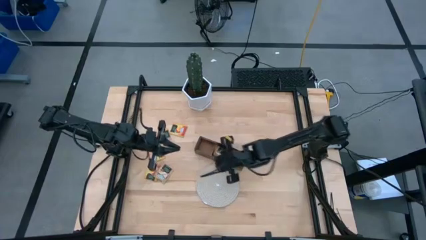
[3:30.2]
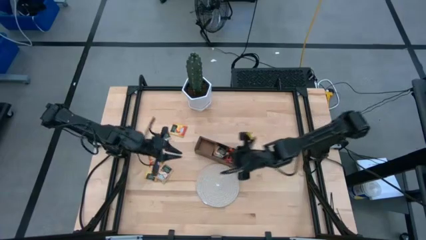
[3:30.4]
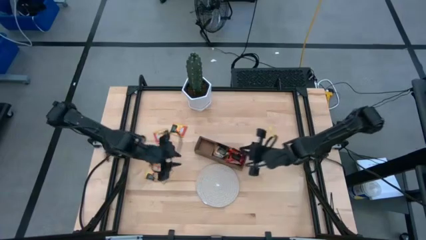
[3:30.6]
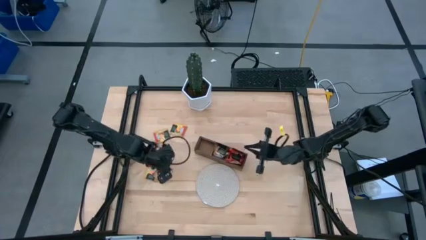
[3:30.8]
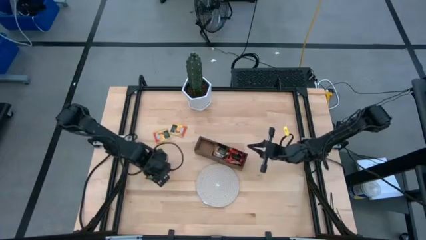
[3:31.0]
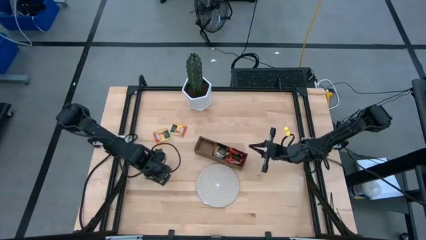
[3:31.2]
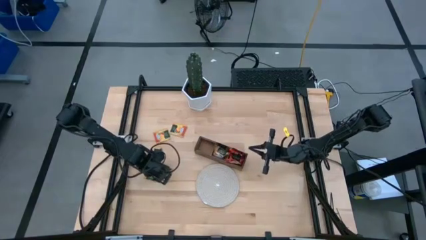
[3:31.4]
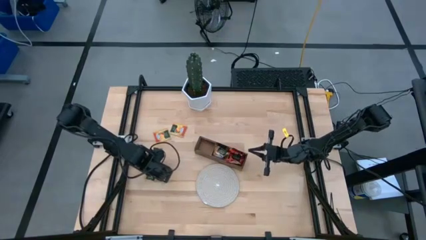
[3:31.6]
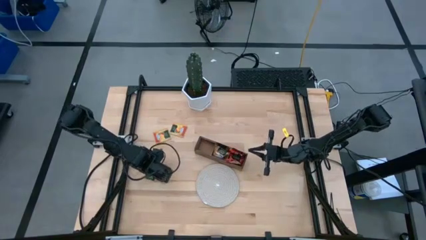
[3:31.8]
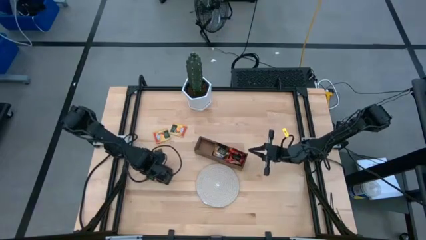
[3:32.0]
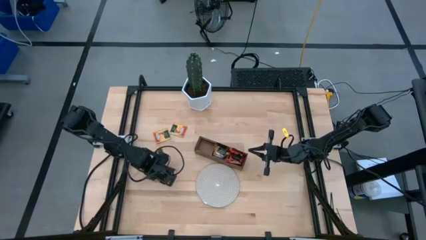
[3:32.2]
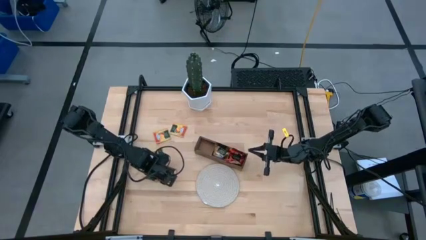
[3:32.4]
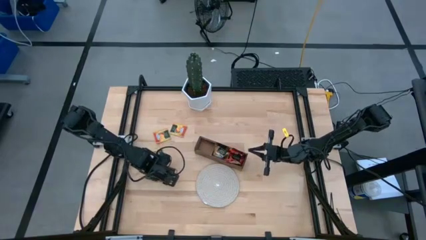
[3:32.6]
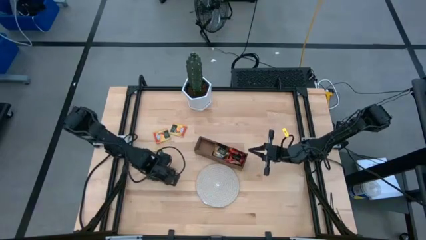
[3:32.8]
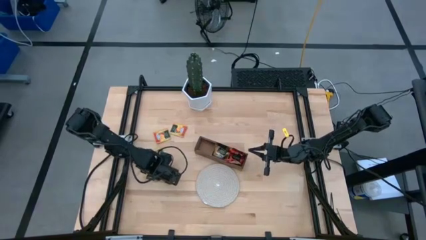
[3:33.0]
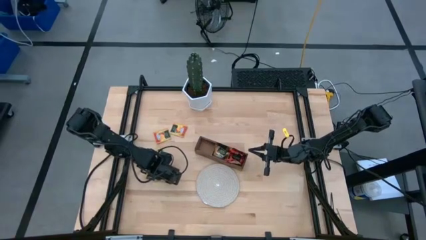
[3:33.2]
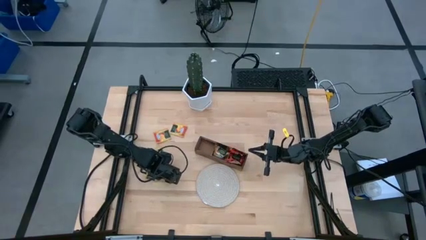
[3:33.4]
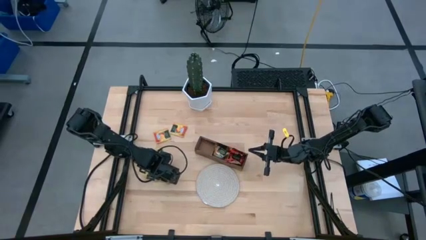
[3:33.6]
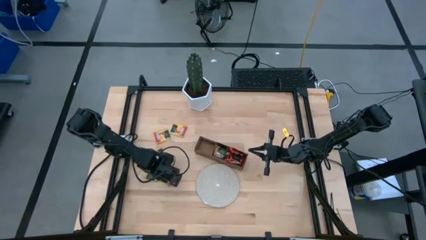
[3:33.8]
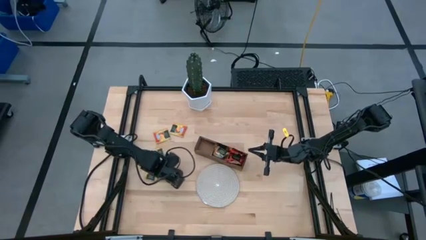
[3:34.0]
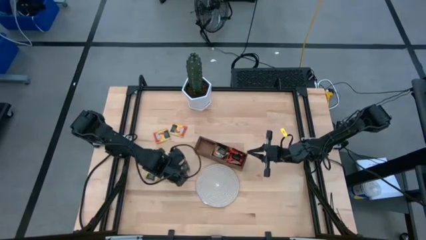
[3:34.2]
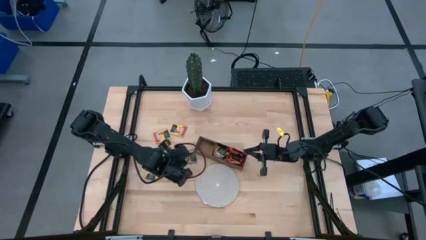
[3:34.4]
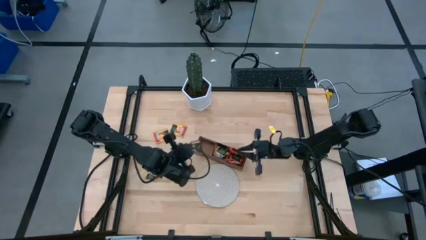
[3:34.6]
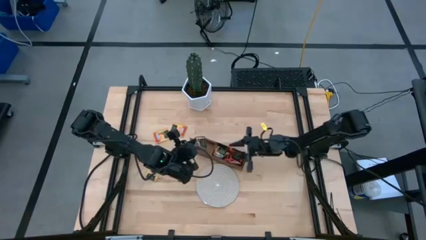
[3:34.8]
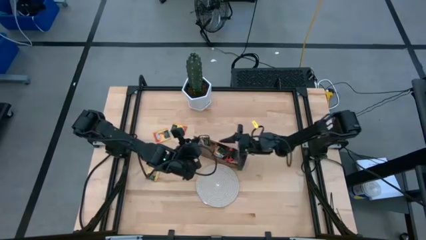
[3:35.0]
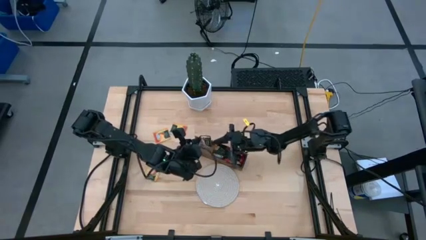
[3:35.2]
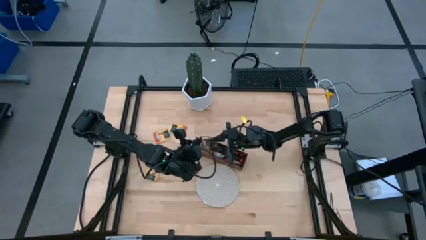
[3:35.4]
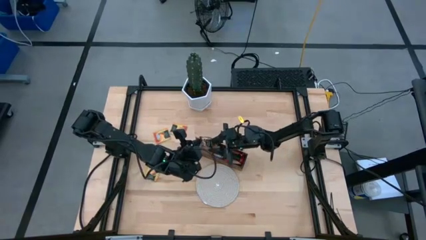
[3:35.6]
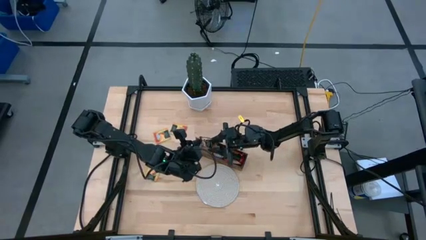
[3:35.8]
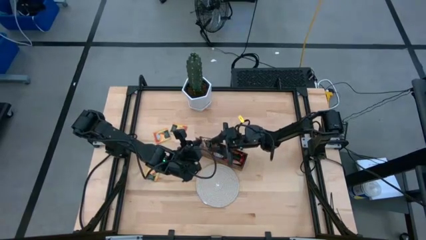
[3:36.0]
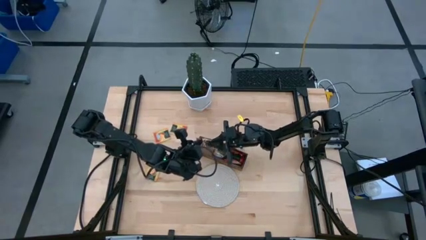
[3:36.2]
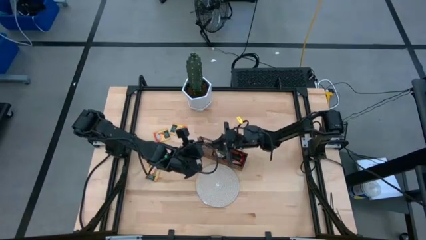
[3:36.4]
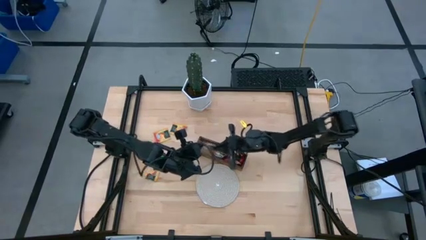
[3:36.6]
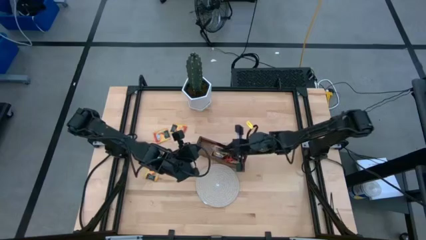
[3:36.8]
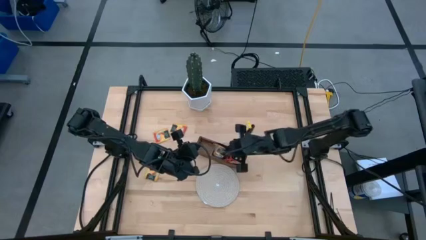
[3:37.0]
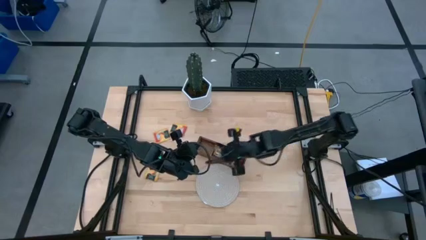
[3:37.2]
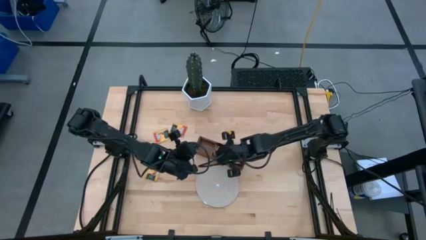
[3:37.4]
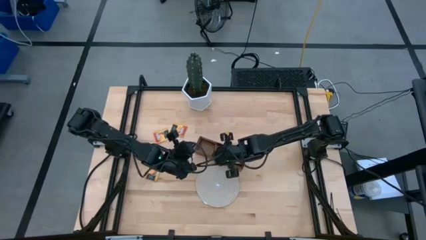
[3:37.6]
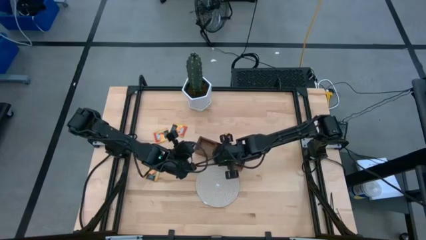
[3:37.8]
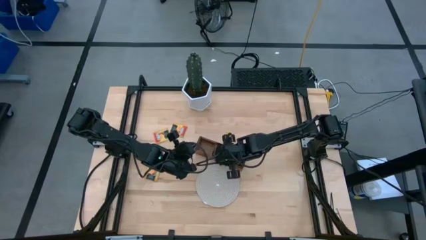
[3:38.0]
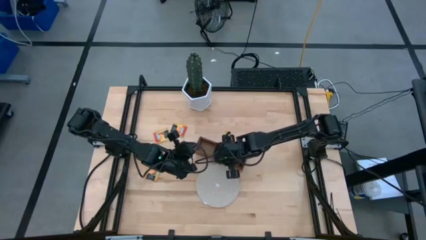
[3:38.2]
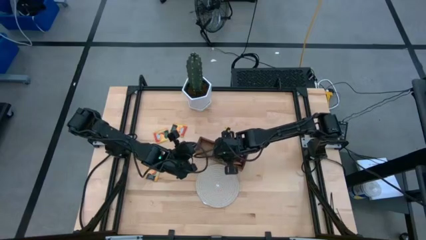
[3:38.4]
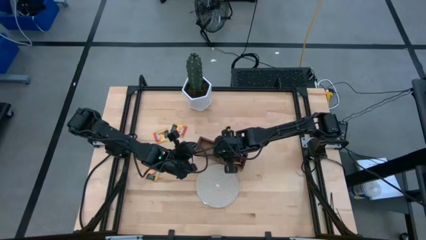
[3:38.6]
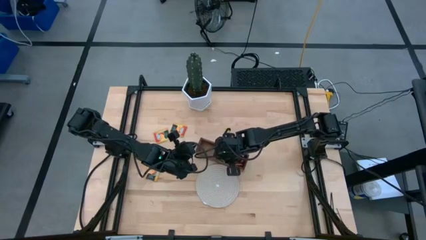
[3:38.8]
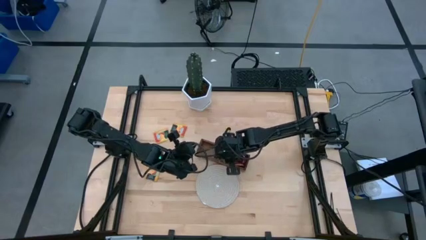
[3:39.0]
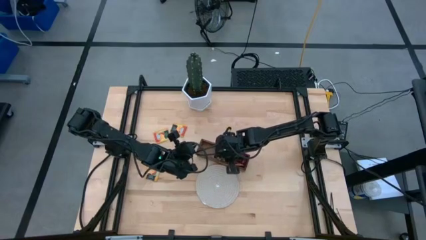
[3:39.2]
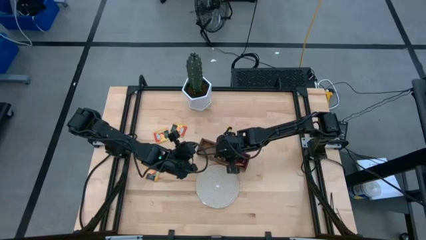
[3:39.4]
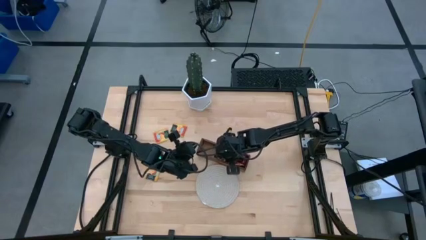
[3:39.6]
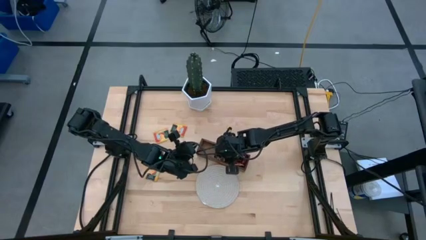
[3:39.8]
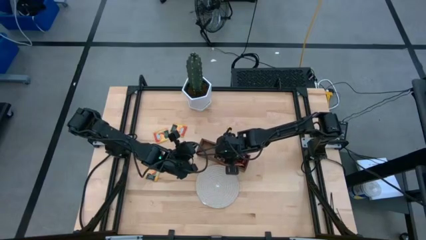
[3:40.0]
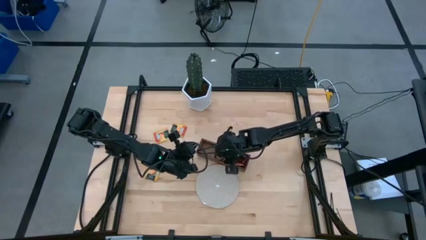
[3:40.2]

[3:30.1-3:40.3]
Task: Pick & Place Tea
Put the brown tea bag into the middle section of the wooden organizer

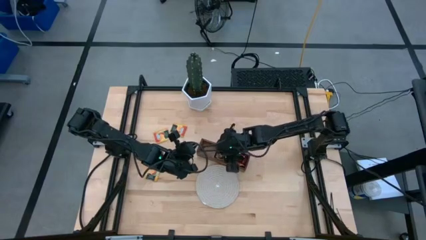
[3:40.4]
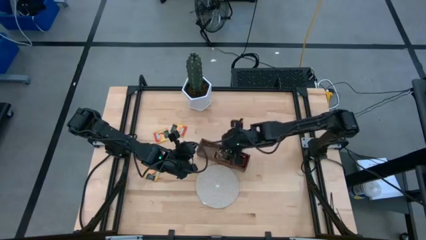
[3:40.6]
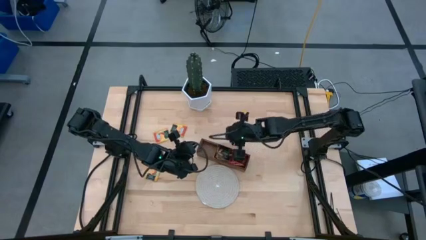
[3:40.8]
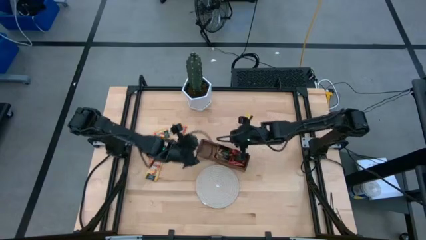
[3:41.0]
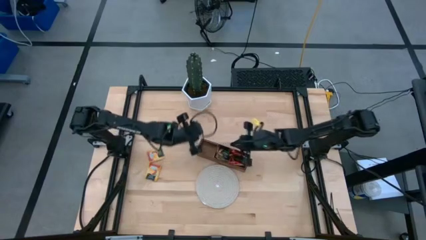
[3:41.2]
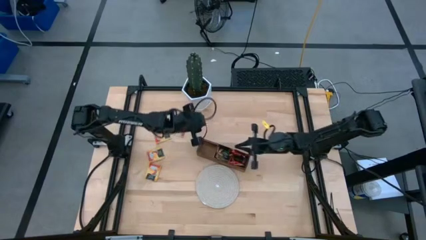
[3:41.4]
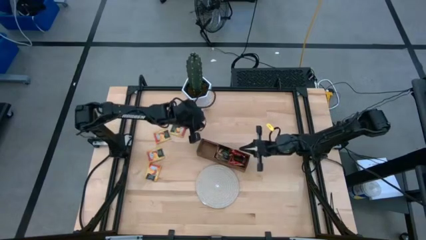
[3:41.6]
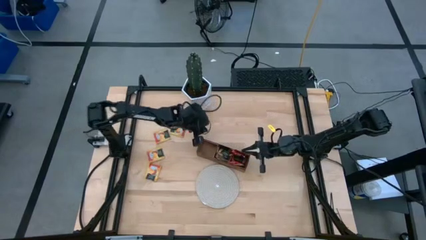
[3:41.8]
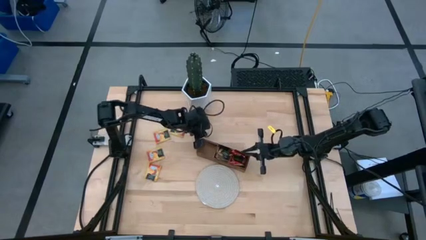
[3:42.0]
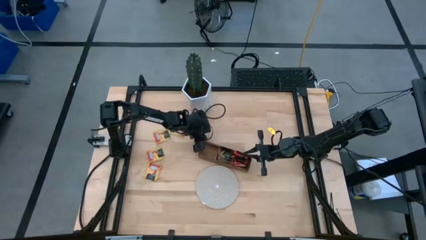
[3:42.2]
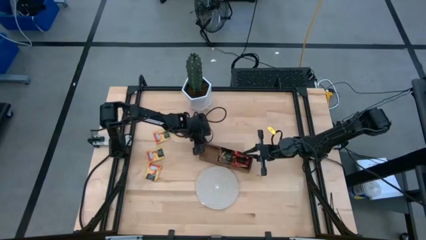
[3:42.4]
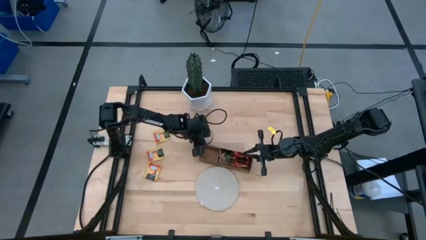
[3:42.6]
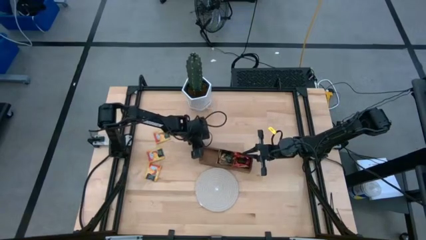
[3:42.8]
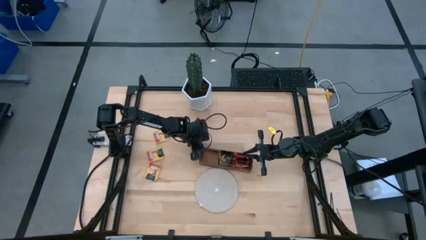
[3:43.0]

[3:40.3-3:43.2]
Adjust the wooden organizer

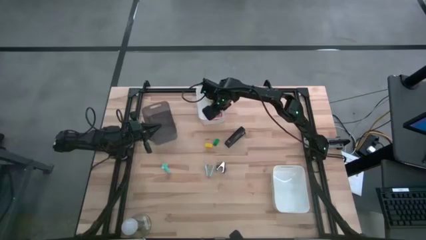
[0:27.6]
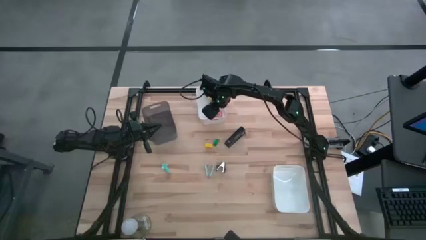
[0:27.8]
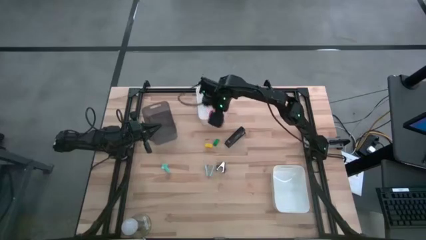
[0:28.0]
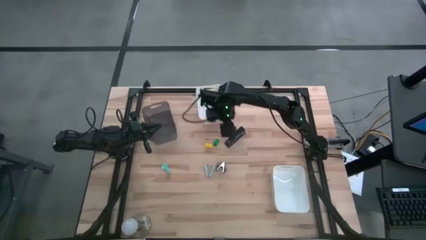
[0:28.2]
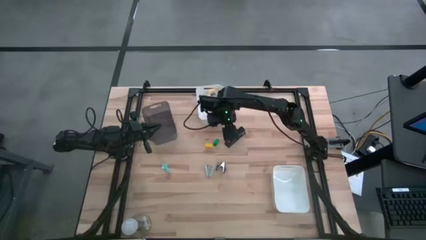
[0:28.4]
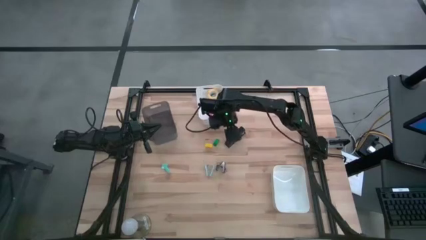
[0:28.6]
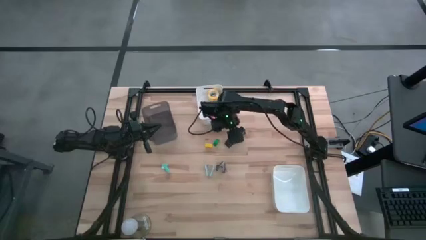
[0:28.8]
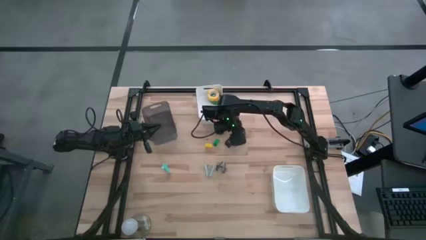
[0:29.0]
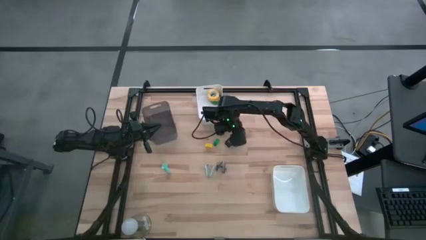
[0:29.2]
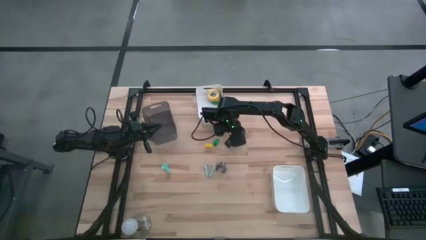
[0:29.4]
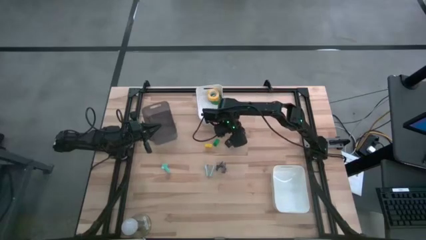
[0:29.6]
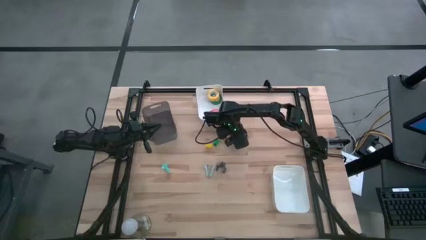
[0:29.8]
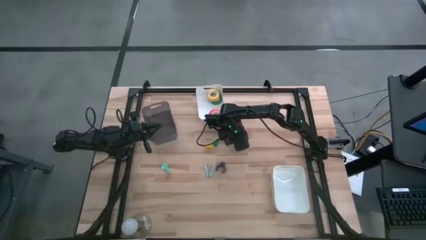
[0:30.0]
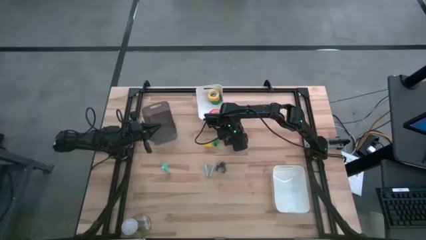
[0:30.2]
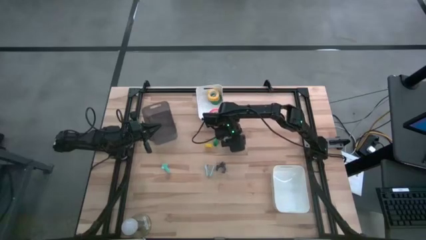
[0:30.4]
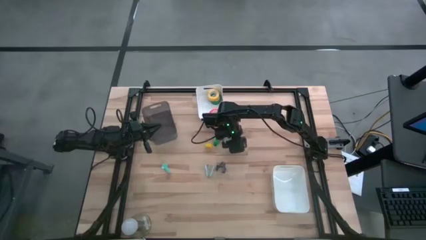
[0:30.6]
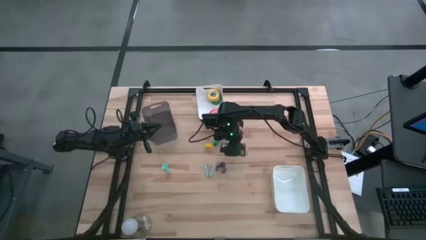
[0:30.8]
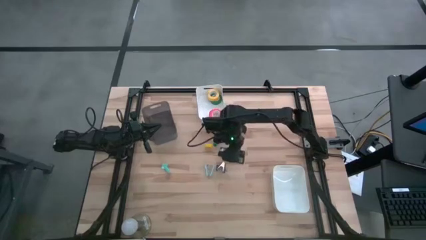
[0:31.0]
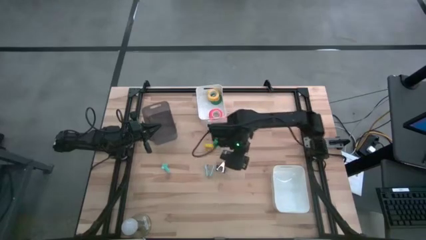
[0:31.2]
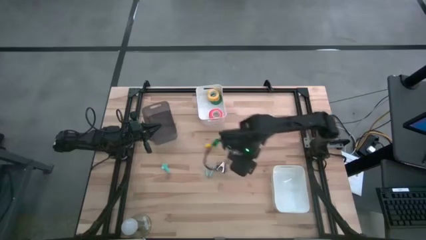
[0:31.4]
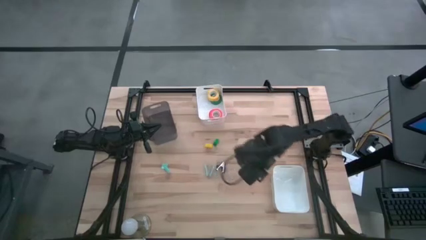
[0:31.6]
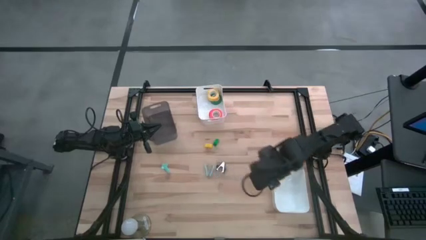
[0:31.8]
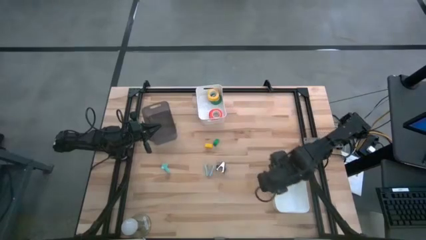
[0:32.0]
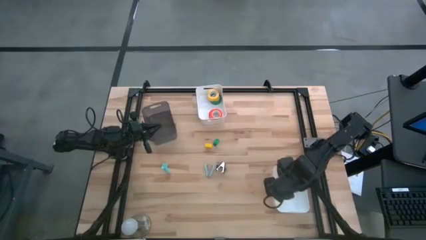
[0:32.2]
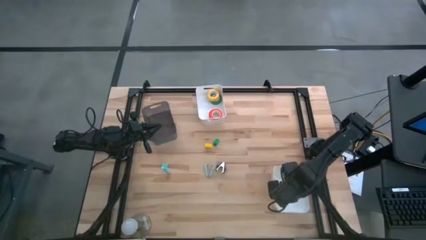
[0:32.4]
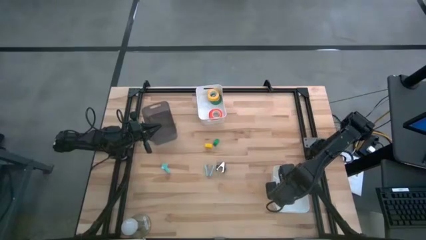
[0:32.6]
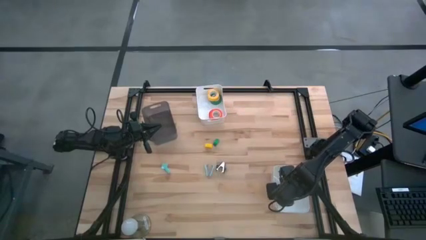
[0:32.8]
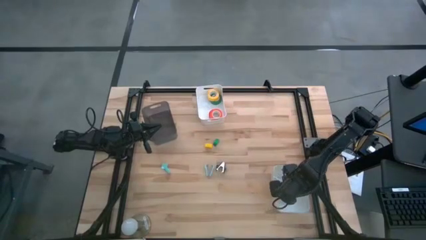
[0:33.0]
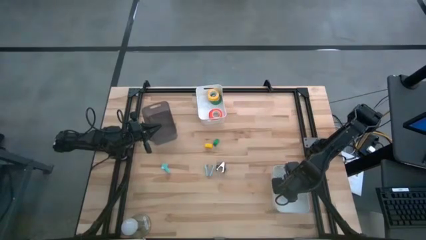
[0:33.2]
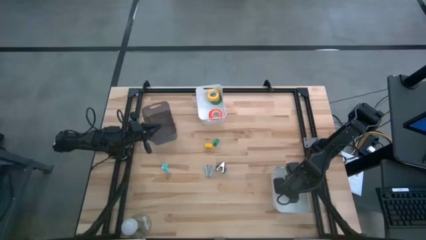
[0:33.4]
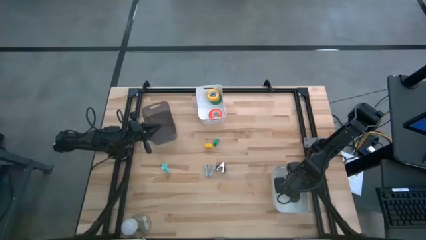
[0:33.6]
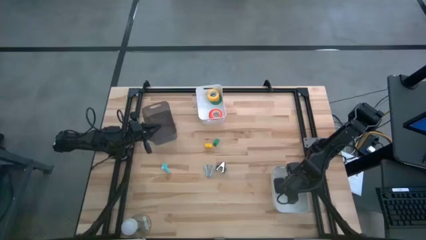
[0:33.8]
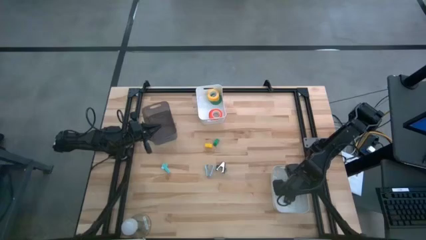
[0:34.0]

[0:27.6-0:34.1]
Task: Pick and place Stapler, Stapler remover, tape
Put the black stapler into the bottom white bin
